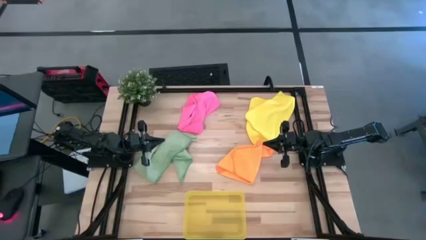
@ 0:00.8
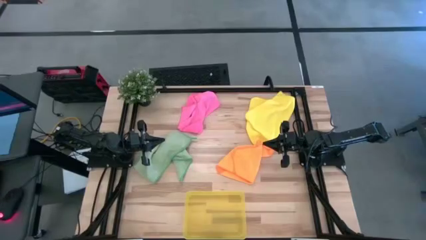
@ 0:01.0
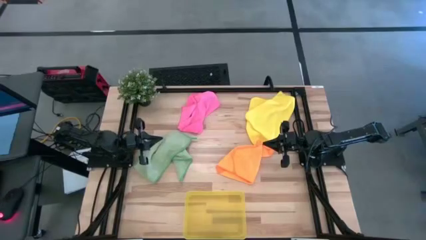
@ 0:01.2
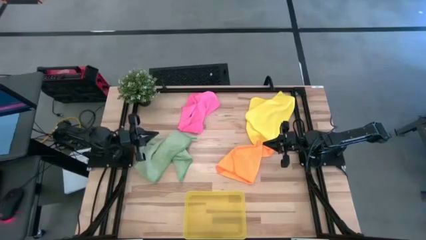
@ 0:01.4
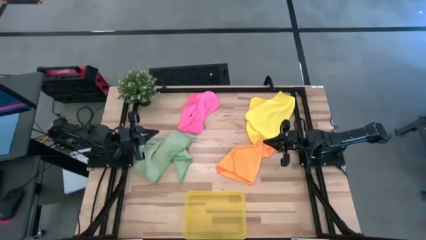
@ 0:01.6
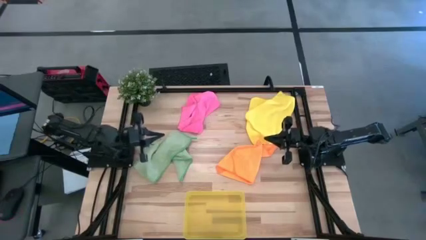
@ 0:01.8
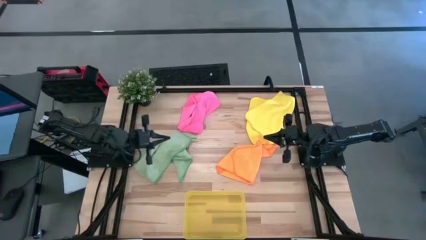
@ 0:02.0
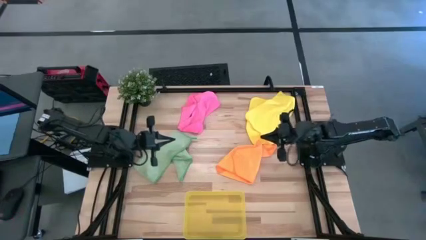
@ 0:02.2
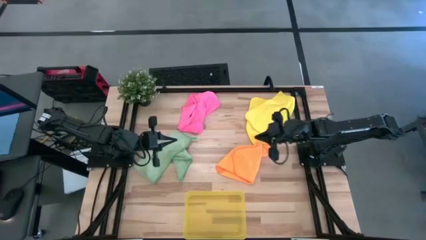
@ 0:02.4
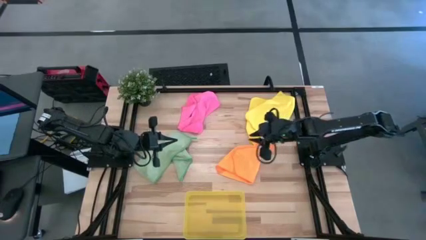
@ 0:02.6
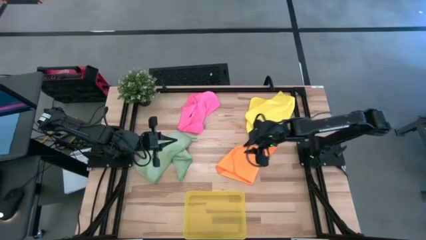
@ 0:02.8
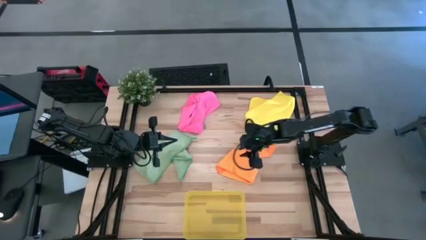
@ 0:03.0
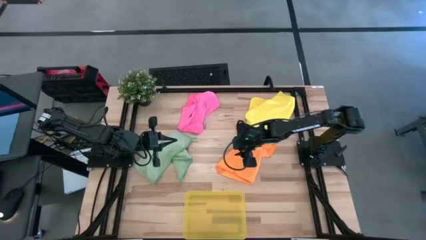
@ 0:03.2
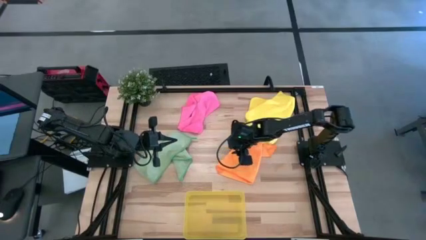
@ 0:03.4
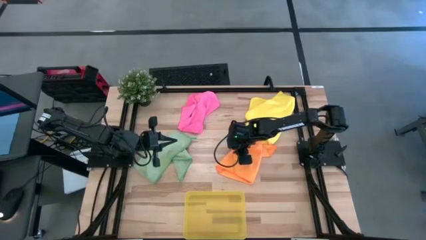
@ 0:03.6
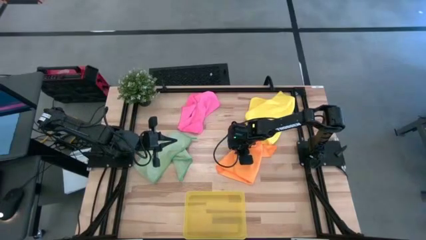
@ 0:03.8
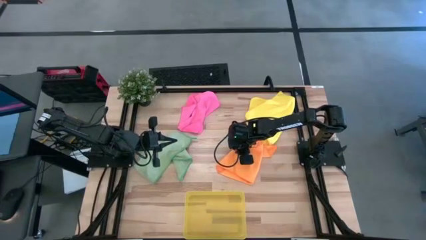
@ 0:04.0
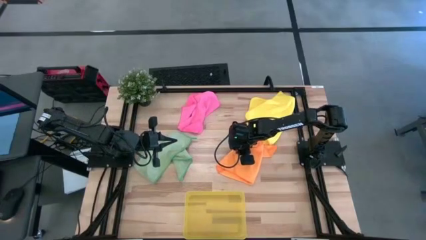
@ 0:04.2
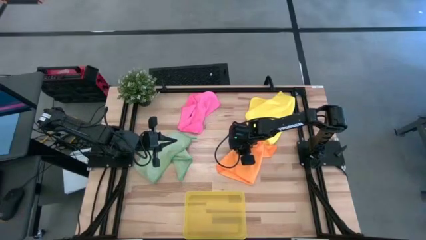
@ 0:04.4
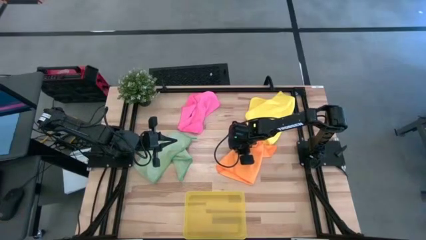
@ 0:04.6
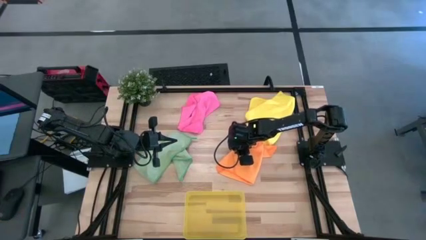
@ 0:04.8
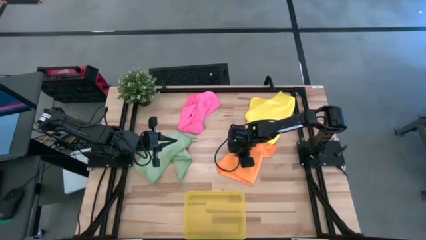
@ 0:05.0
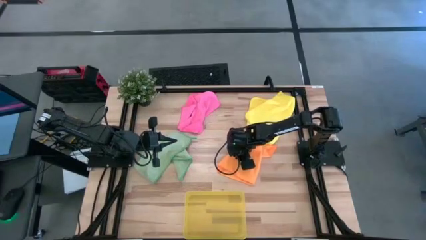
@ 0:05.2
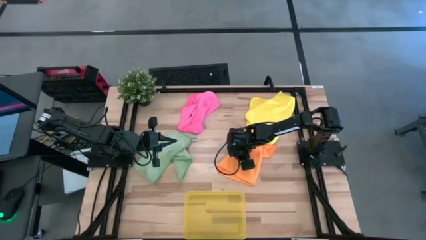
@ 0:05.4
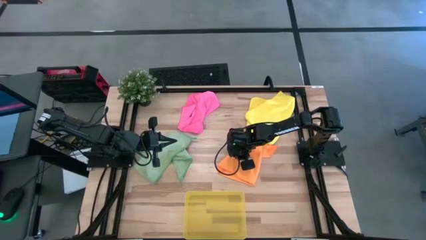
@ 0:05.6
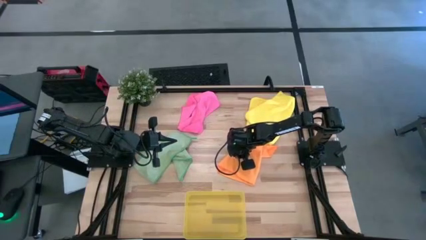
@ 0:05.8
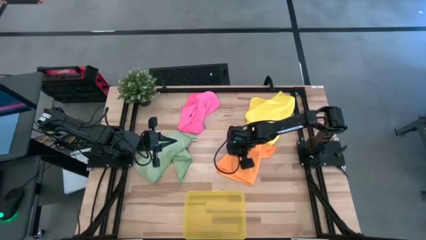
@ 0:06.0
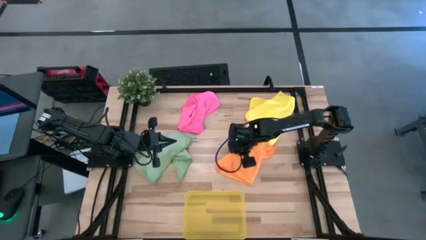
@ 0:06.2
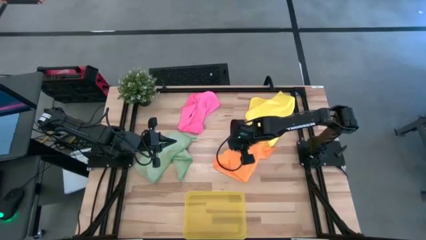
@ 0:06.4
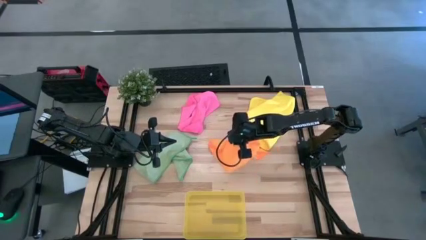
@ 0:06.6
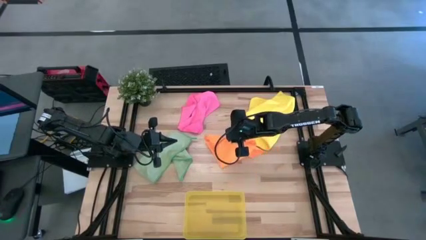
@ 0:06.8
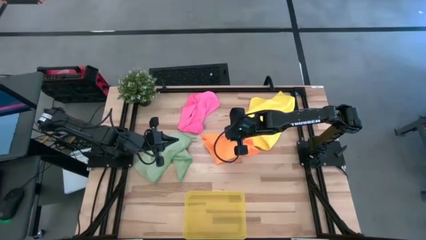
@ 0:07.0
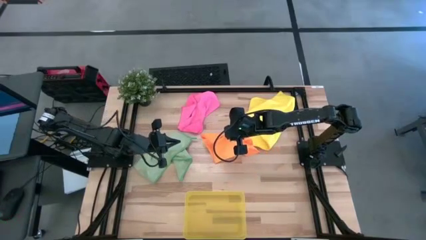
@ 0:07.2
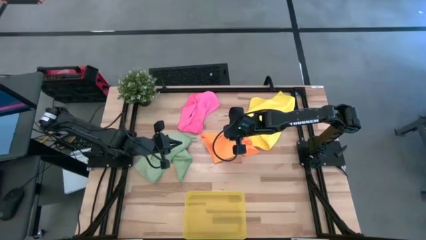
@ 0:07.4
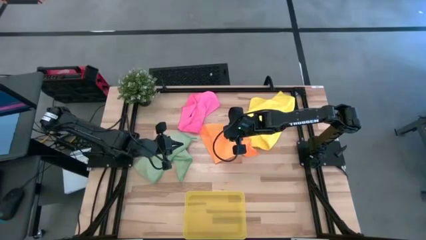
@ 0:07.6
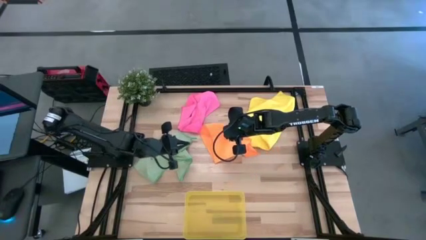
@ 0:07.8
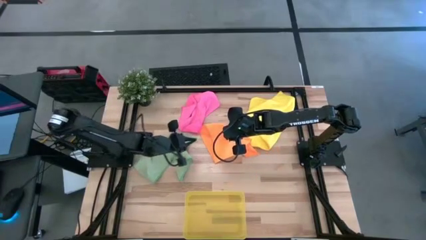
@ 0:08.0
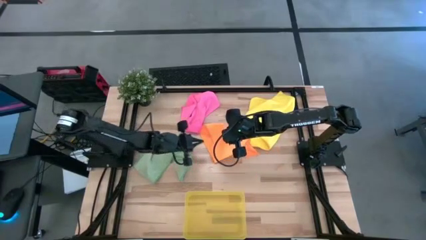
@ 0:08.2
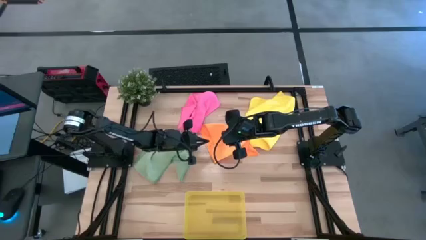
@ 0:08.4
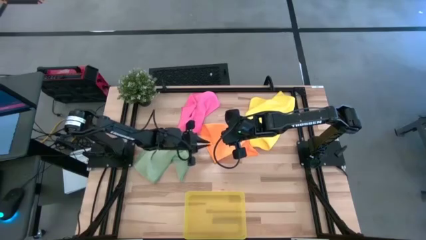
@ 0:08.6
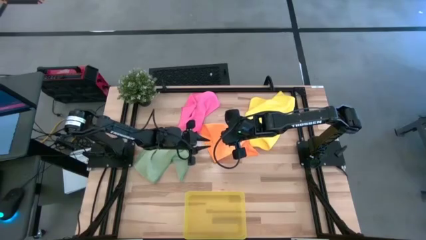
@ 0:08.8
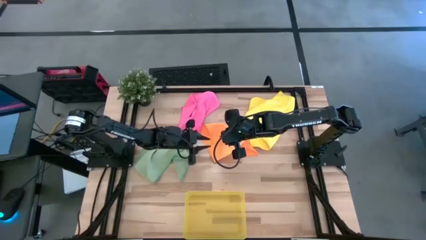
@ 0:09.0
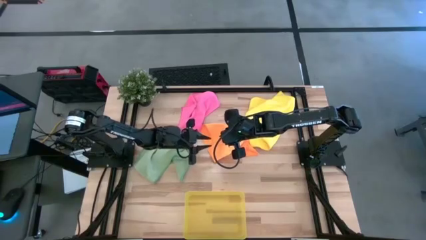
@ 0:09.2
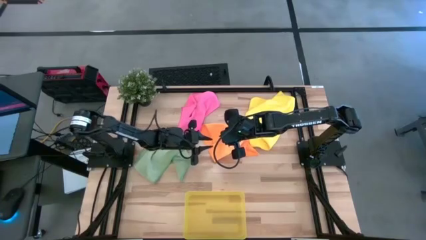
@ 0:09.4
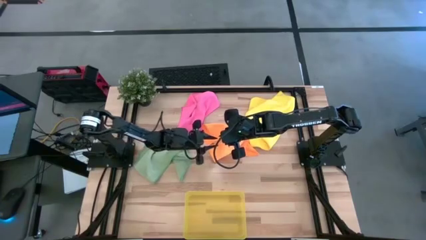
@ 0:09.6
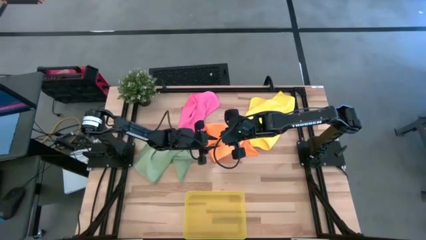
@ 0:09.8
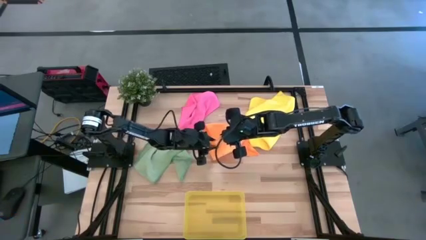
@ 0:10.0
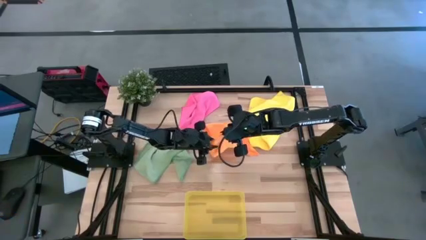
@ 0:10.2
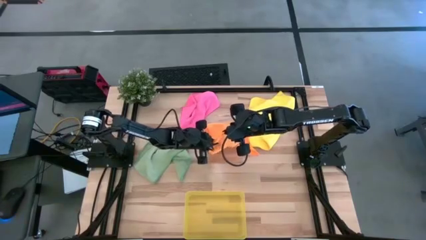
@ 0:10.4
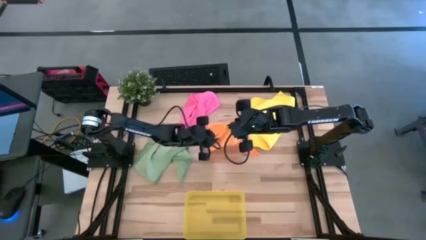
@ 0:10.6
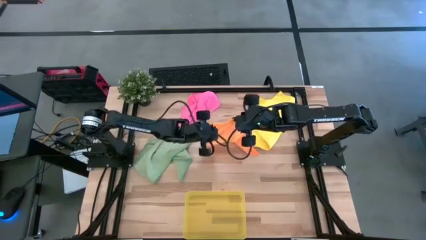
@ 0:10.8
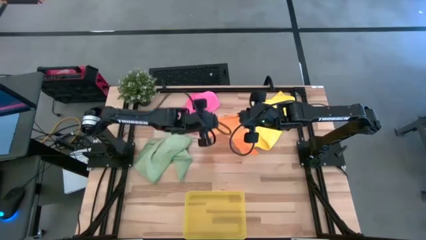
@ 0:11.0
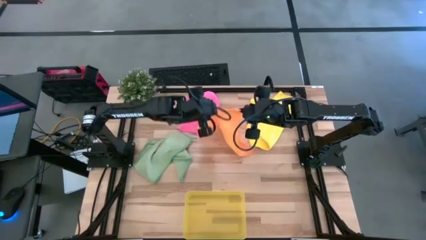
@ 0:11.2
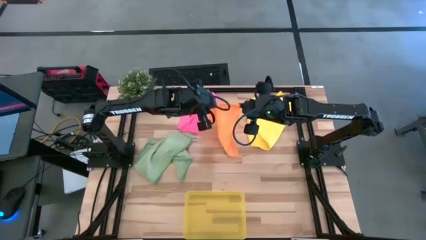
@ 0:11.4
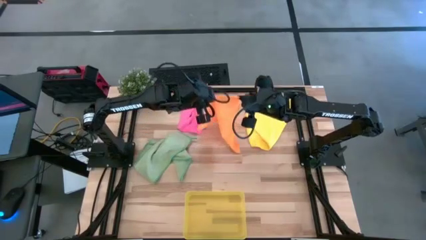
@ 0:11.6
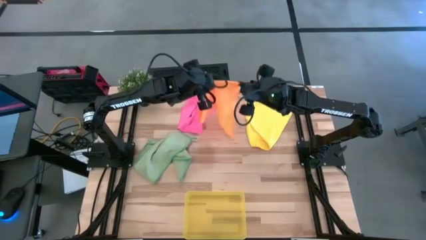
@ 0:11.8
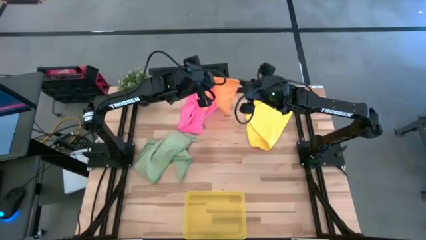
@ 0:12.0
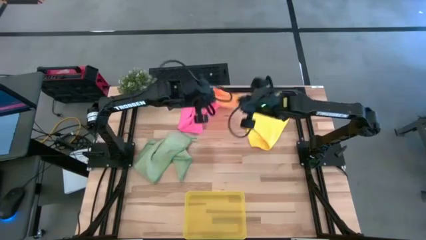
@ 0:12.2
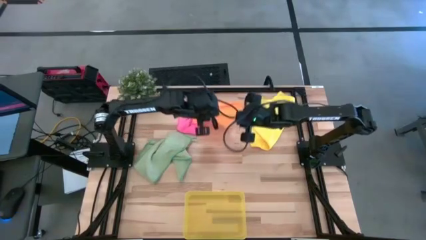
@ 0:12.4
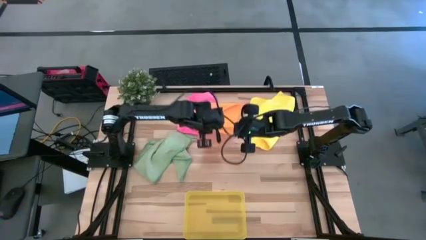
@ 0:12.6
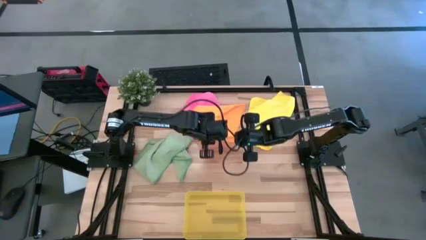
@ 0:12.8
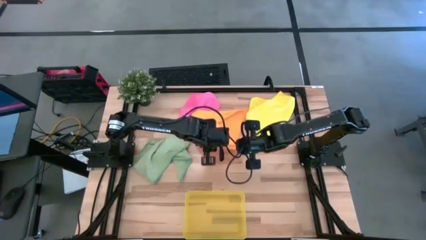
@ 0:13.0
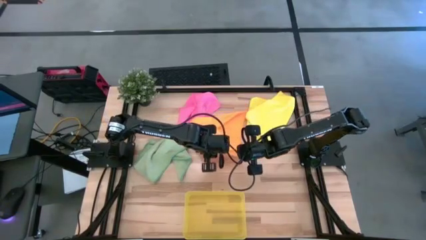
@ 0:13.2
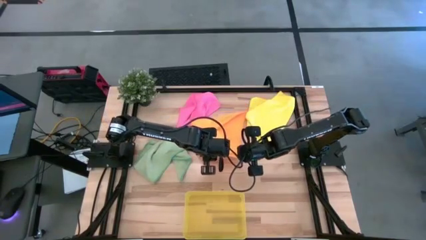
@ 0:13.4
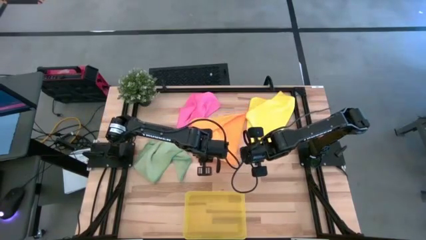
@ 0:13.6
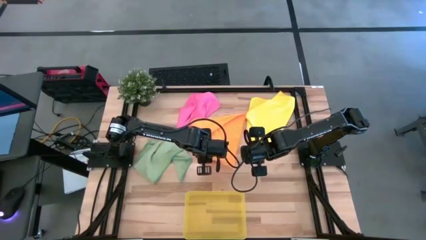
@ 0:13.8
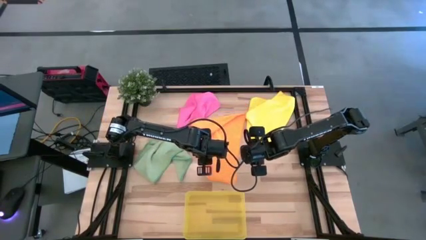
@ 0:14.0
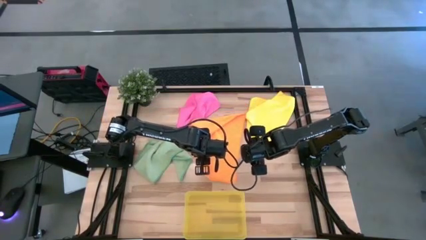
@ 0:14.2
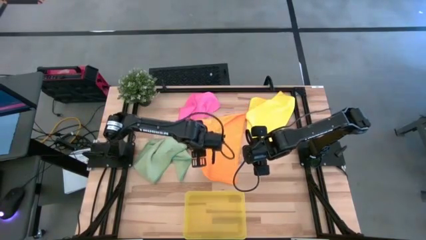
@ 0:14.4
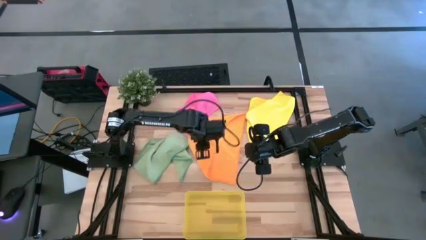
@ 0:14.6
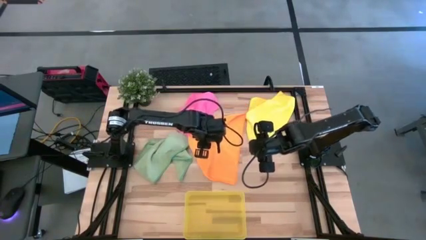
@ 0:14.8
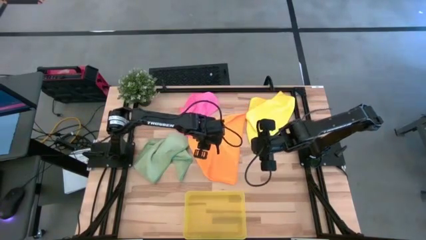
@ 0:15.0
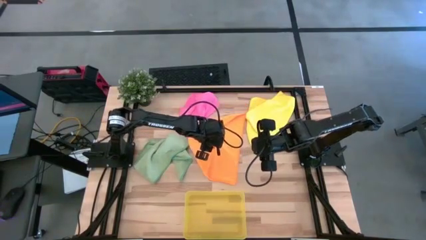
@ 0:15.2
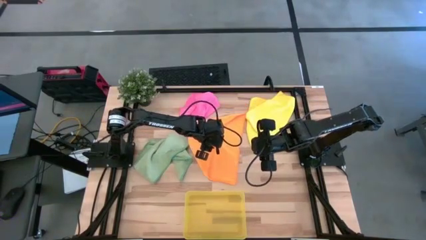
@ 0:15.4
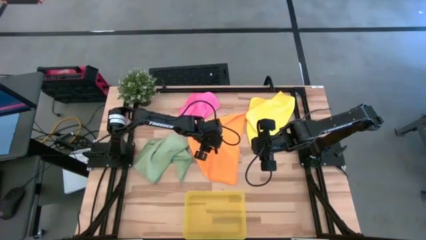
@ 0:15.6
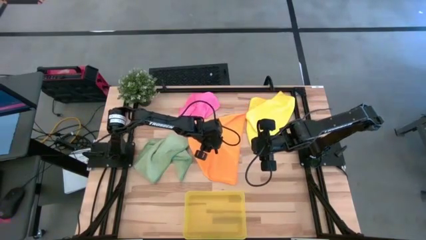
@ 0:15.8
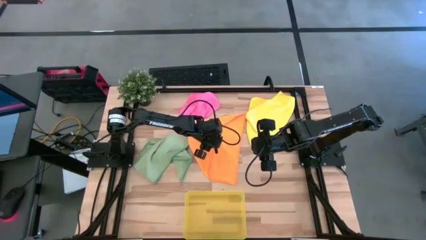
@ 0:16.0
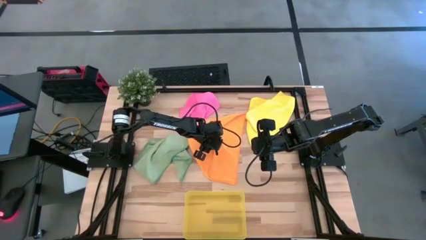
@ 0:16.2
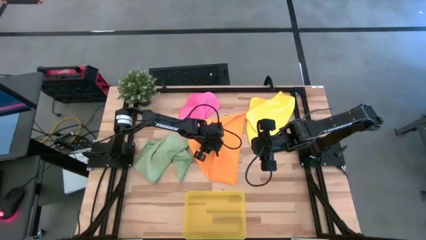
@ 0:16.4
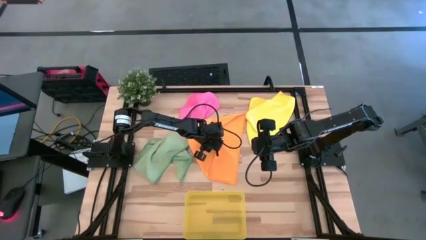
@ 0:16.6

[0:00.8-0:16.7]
Task: Fold microfiber towels
Fold the orange microfiber cloth
